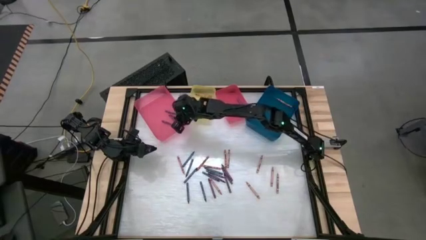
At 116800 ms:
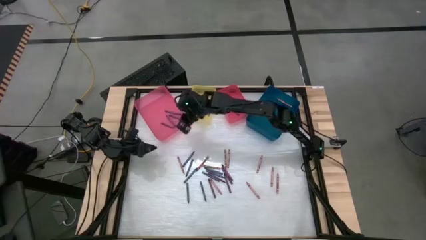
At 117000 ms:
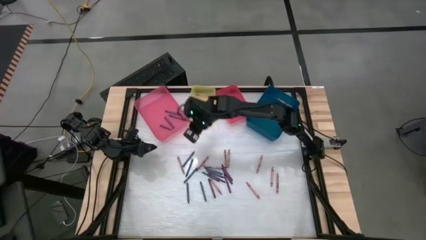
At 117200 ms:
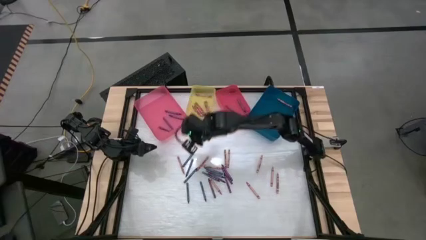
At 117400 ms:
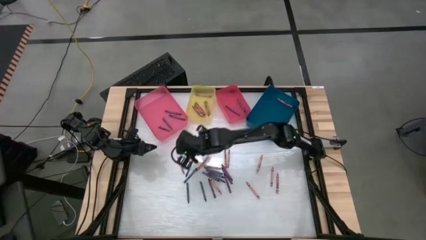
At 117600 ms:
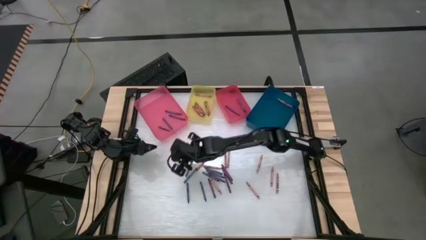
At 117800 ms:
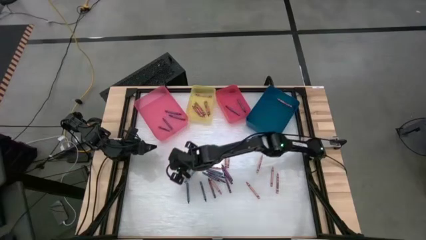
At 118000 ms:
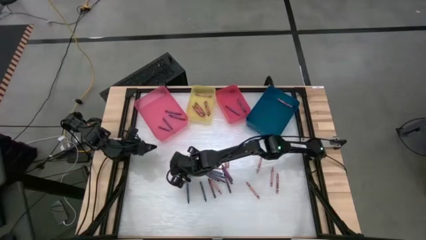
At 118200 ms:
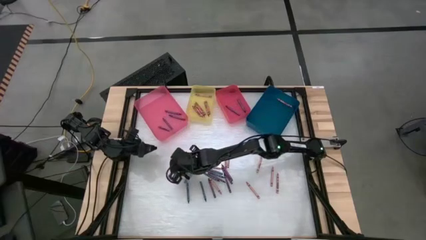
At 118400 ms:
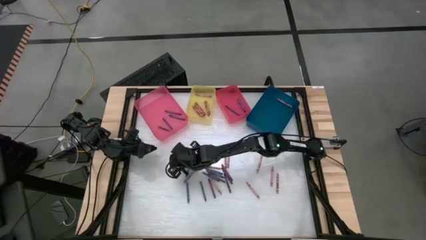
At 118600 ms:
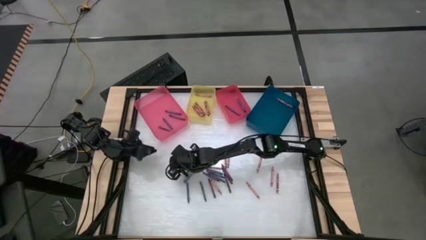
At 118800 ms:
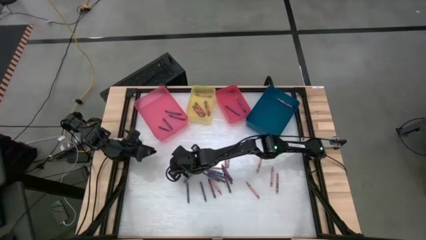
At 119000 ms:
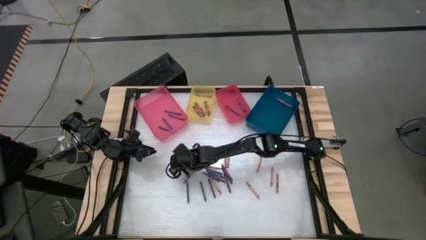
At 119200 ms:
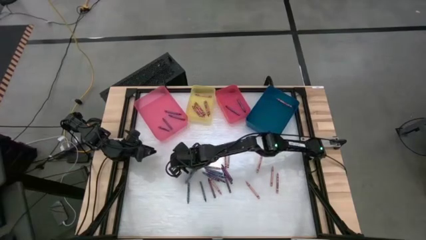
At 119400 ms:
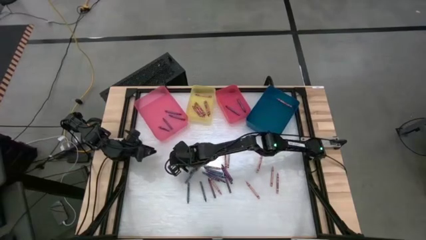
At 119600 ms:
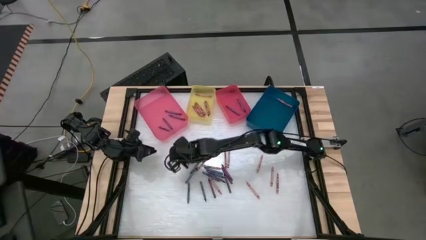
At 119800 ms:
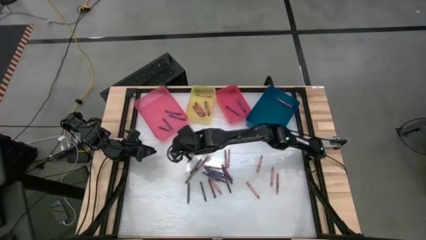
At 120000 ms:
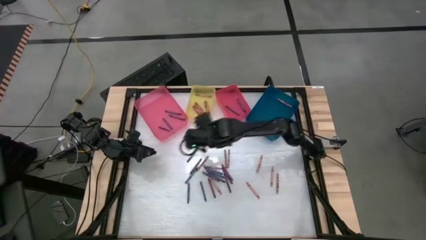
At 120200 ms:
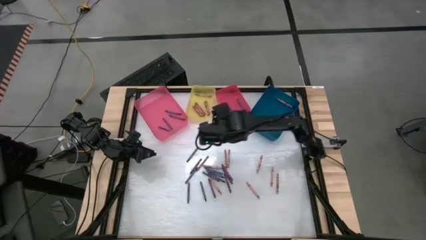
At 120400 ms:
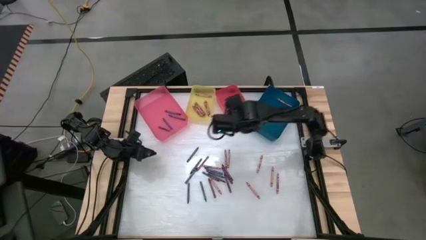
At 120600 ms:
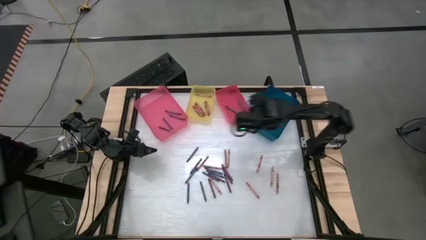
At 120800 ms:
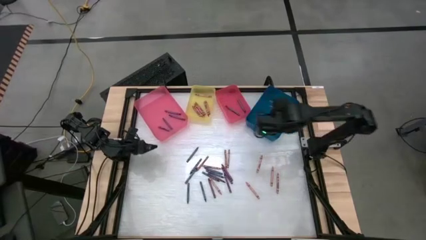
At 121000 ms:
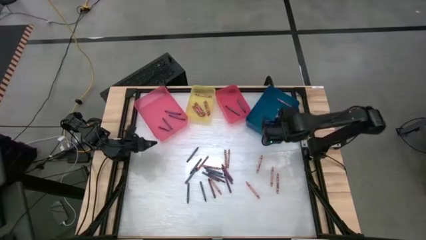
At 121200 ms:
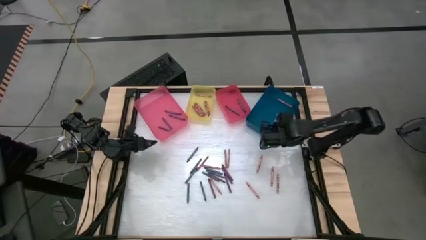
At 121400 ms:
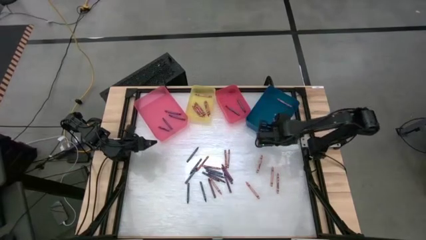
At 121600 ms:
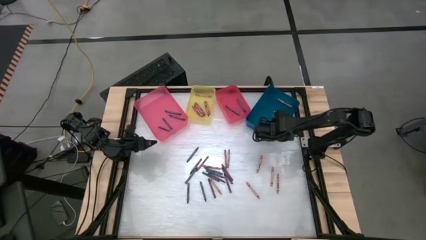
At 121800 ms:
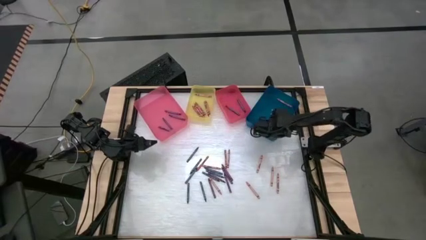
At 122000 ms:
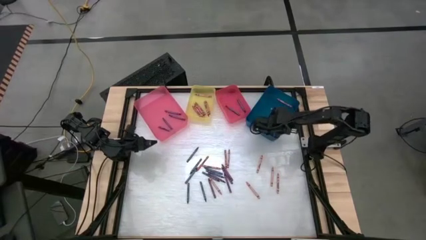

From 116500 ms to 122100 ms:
Task: Sort crayons
Put the pink crayon into the blue bin

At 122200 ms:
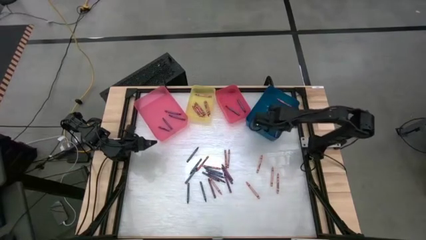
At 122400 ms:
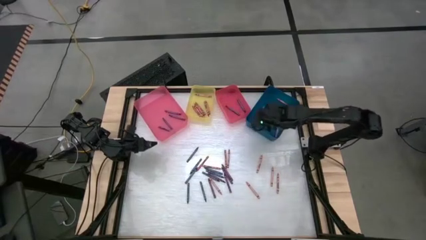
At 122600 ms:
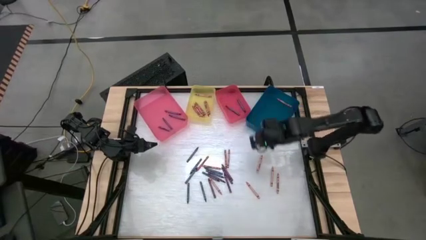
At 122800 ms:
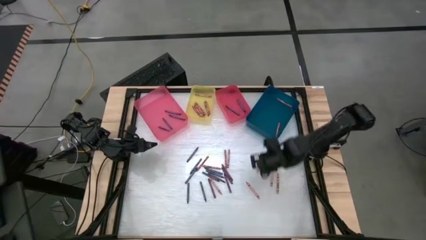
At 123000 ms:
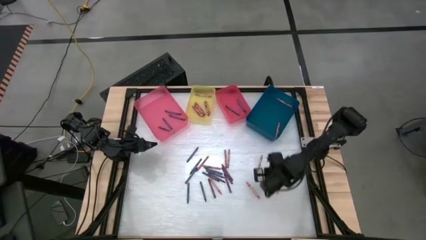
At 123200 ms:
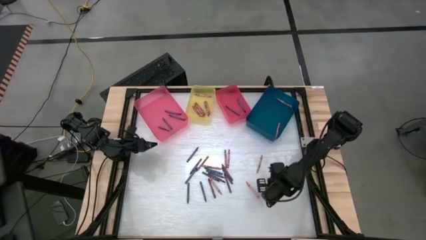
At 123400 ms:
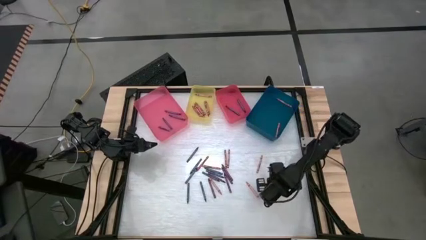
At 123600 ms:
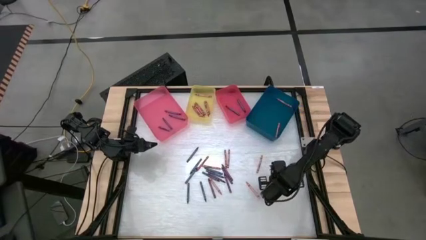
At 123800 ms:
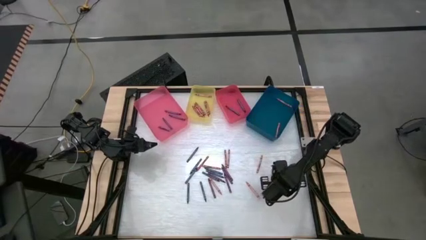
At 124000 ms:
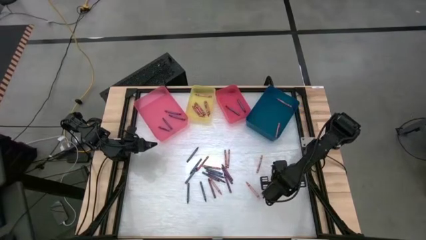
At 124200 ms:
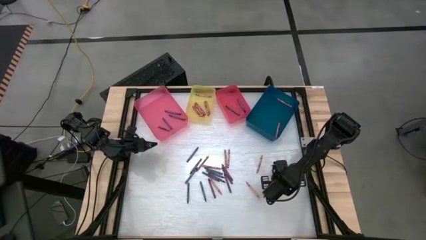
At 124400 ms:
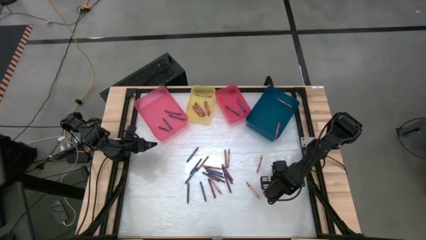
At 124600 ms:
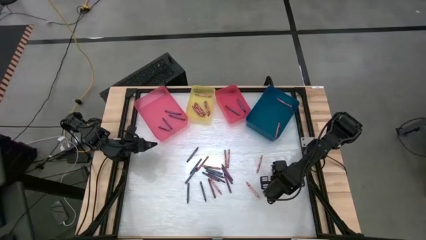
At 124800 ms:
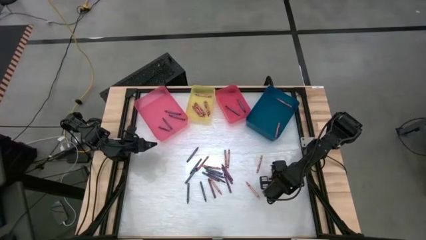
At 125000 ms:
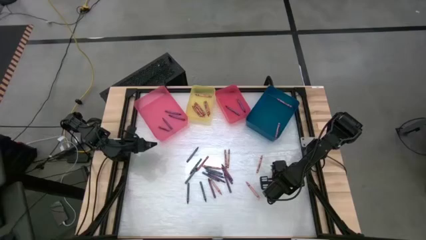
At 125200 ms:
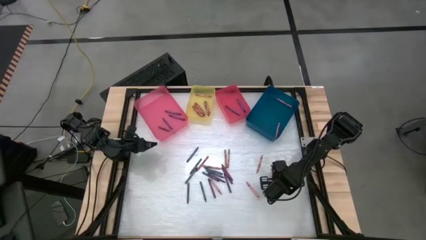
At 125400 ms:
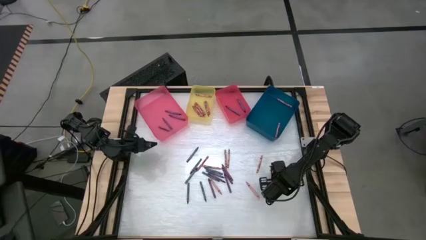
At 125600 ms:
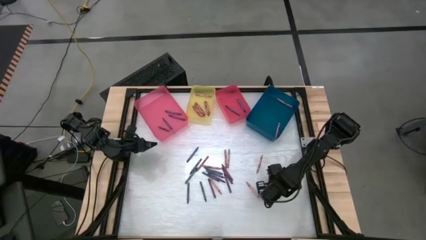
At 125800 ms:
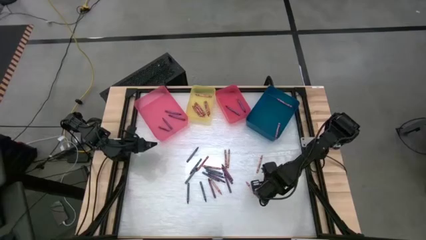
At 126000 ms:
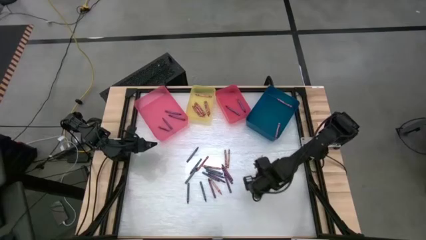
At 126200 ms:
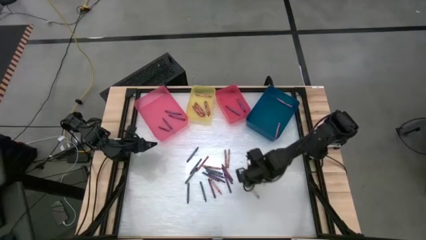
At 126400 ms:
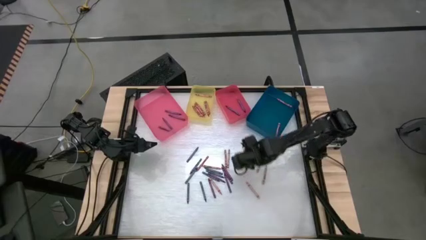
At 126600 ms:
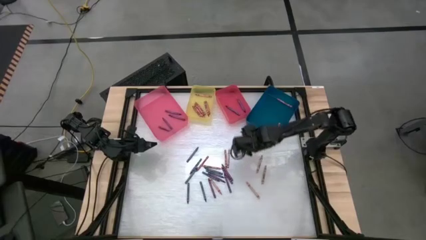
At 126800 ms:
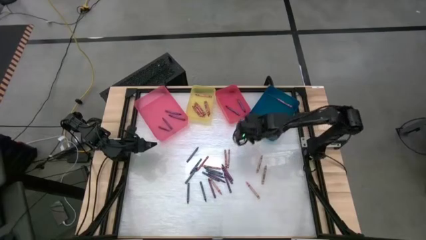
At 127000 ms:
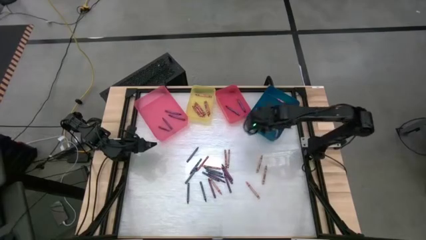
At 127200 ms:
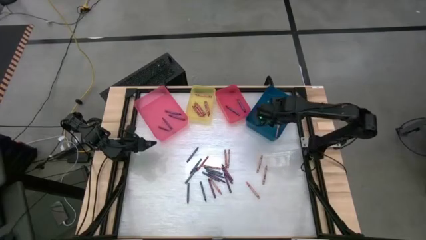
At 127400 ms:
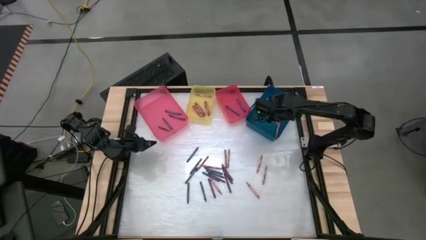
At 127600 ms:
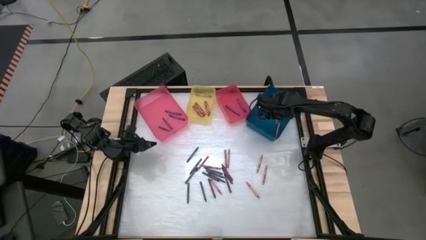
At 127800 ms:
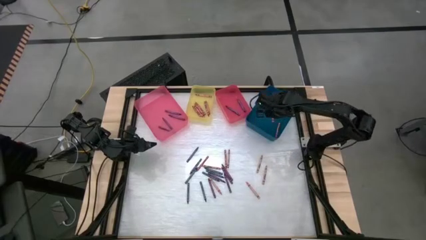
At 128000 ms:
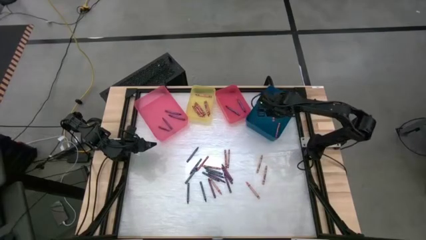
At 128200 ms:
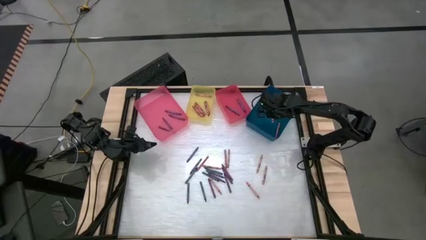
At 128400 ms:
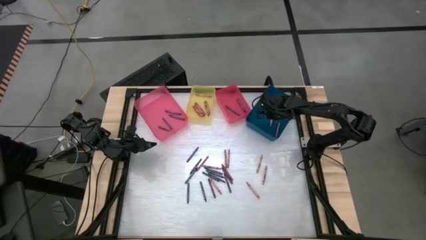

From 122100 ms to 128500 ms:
Put the pink crayon into the blue bin

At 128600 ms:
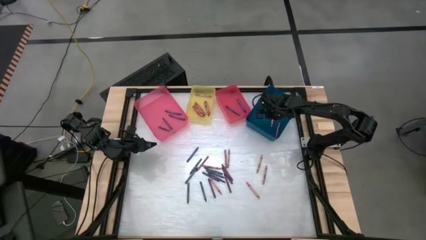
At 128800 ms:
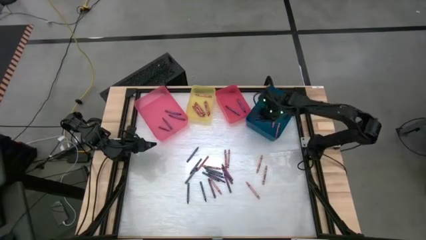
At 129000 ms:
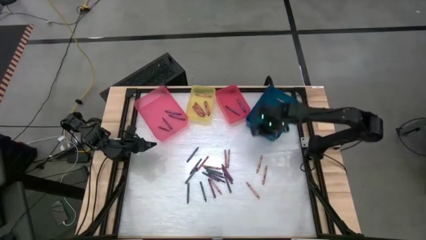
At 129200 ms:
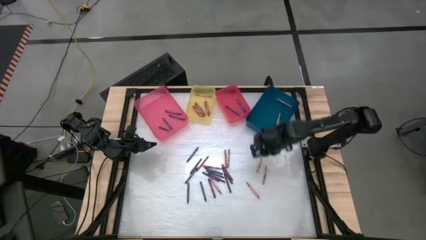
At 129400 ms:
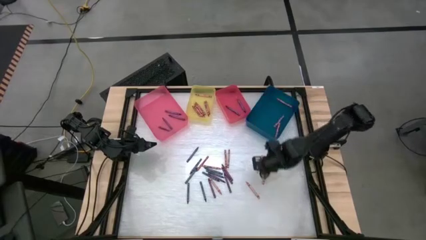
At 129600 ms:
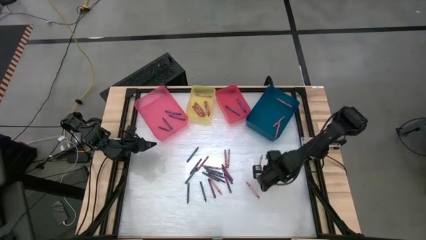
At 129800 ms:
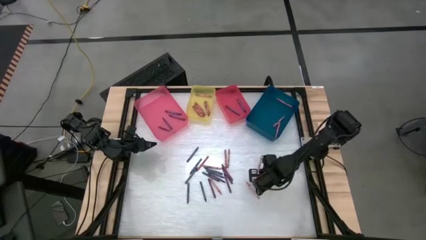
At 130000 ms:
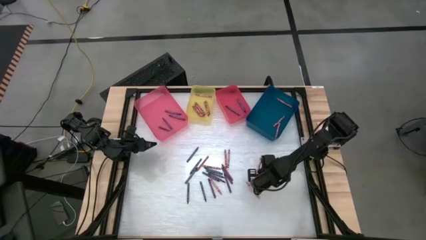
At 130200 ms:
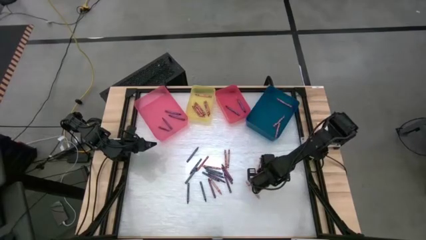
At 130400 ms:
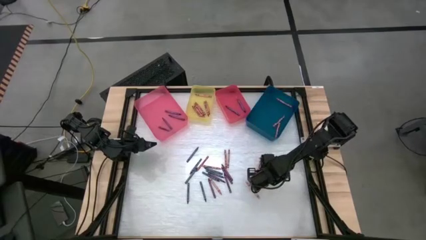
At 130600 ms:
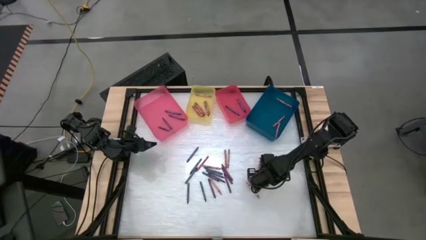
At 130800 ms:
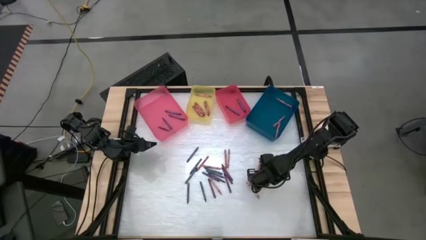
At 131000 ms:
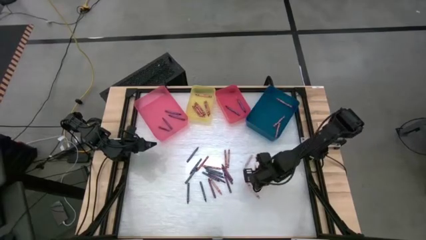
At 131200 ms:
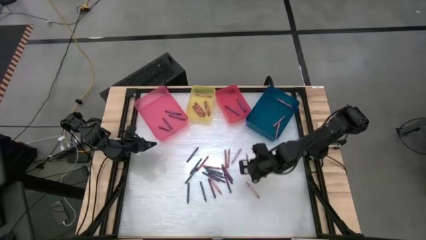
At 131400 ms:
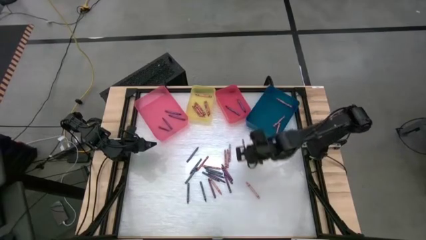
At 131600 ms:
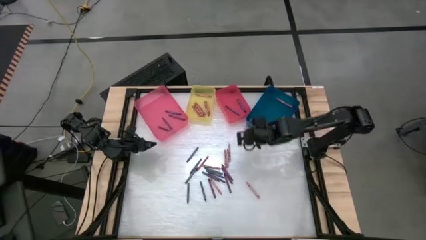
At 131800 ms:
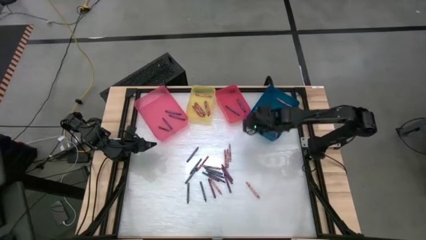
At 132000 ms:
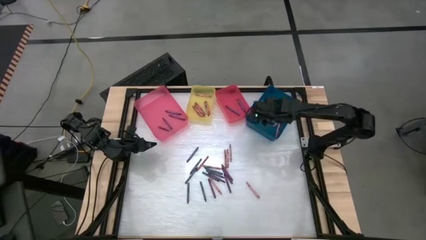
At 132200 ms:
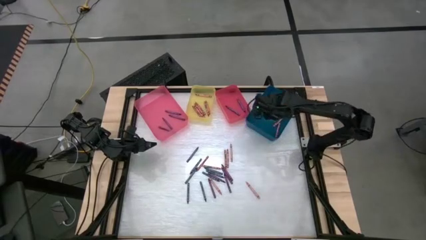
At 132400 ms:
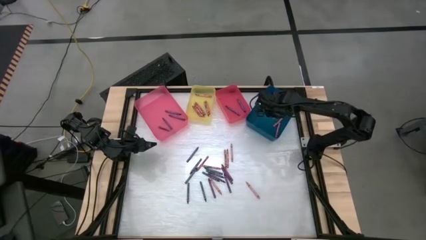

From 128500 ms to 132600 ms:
Put the pink crayon into the blue bin
